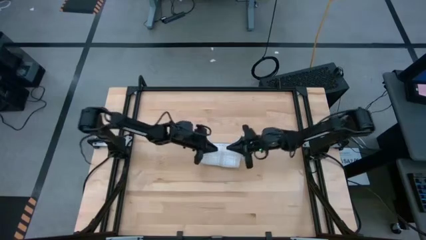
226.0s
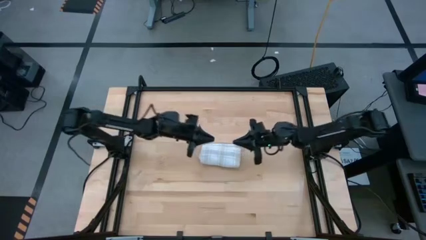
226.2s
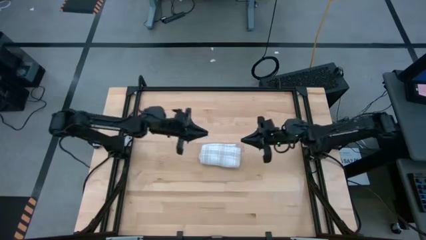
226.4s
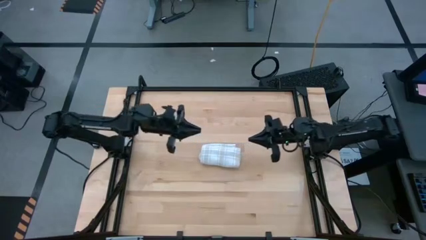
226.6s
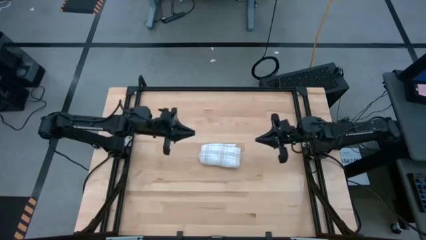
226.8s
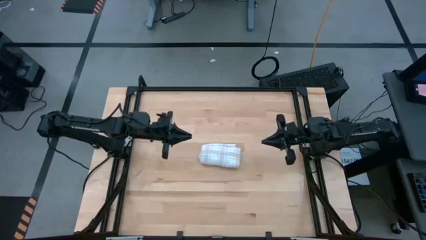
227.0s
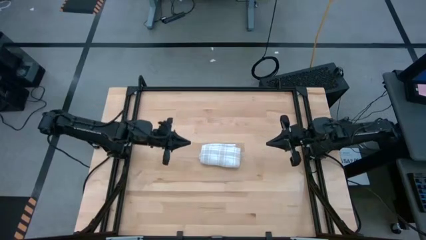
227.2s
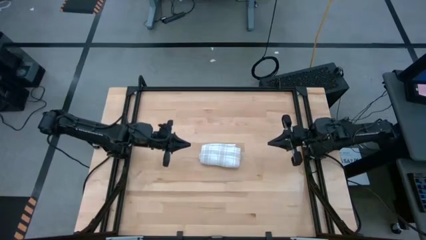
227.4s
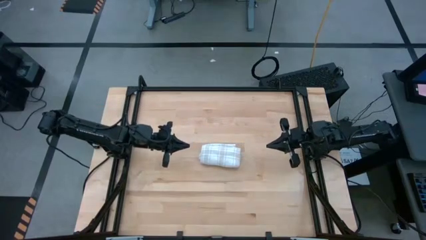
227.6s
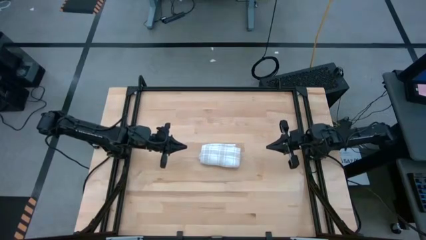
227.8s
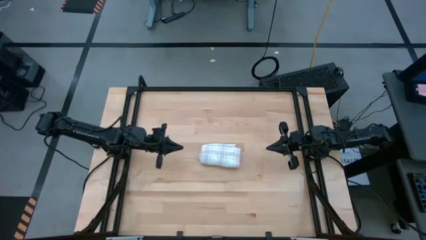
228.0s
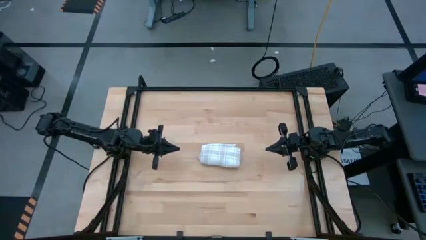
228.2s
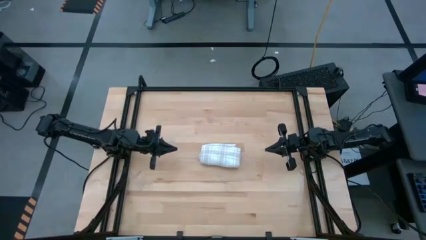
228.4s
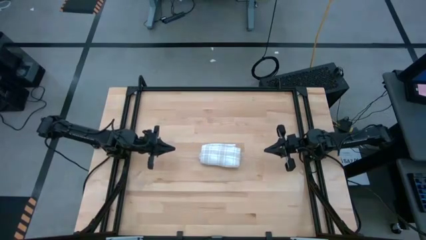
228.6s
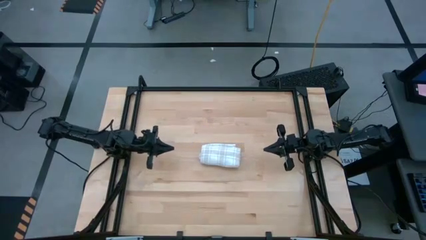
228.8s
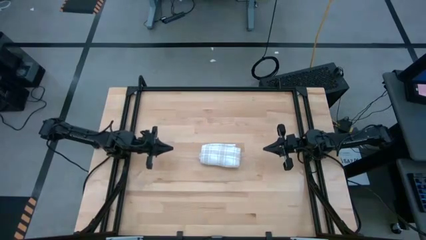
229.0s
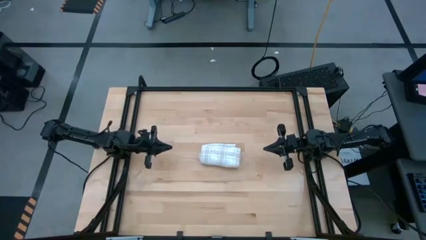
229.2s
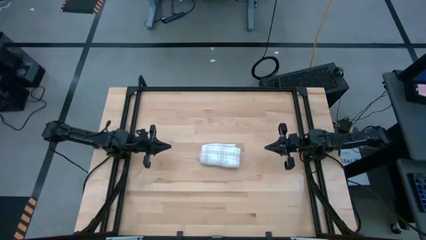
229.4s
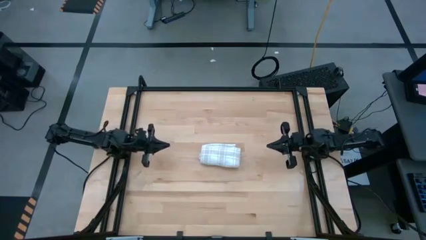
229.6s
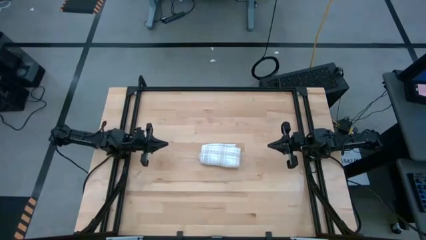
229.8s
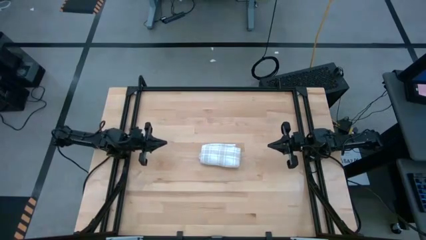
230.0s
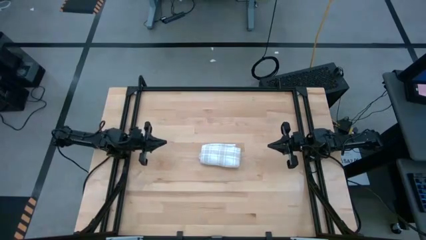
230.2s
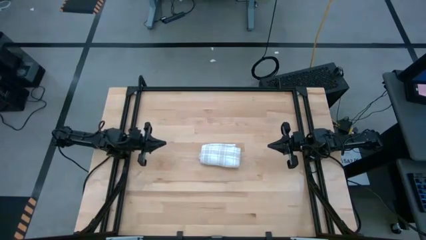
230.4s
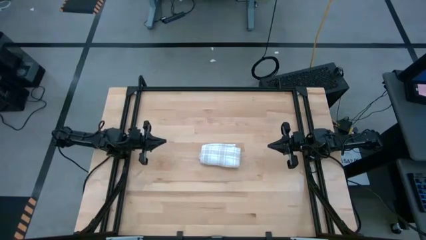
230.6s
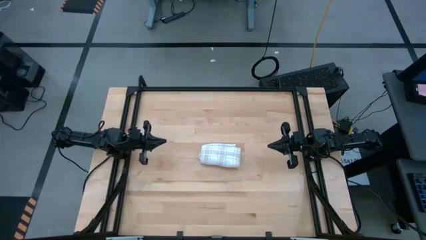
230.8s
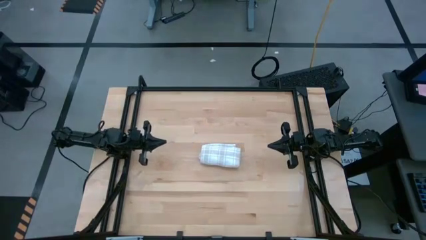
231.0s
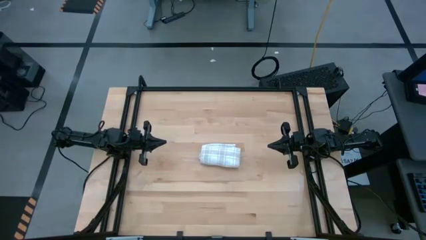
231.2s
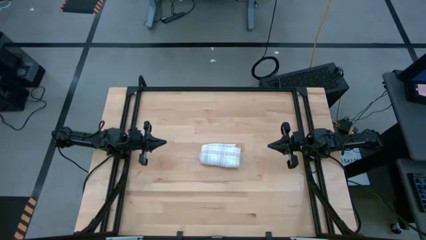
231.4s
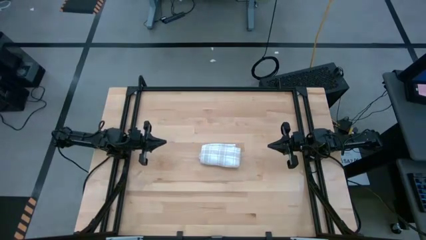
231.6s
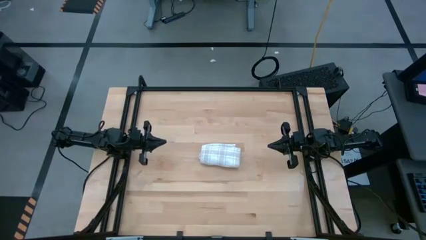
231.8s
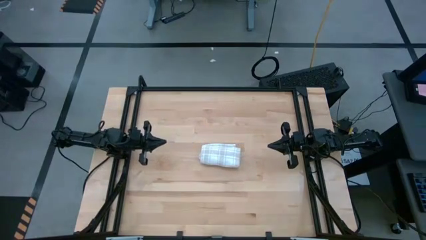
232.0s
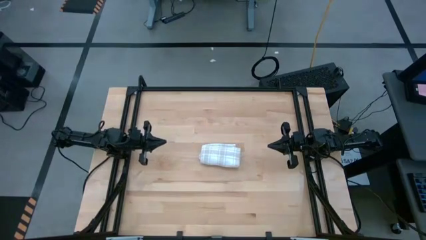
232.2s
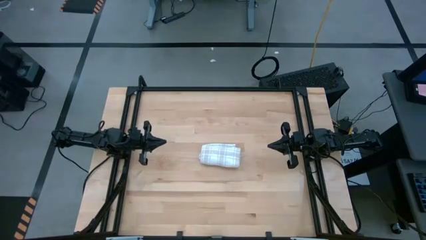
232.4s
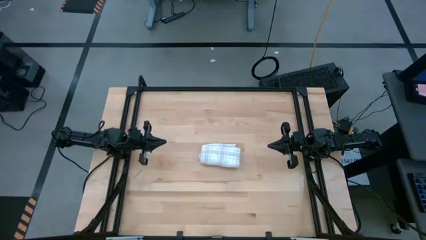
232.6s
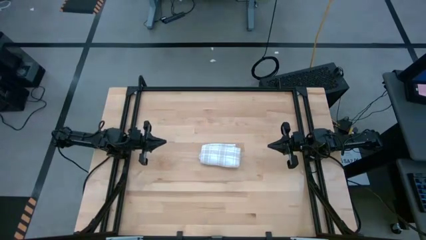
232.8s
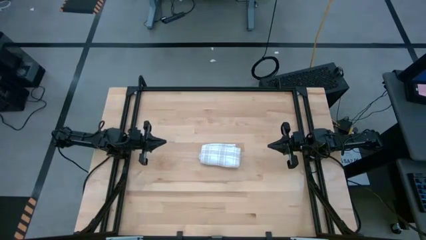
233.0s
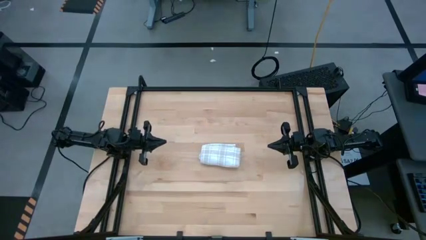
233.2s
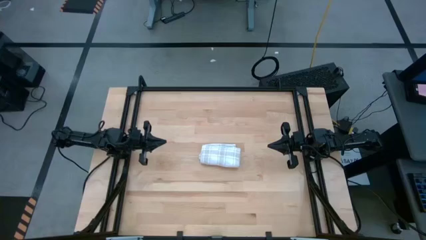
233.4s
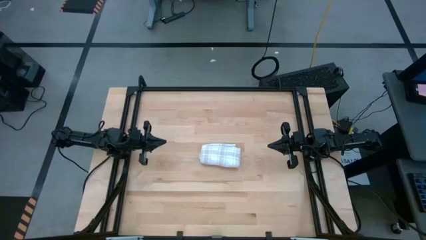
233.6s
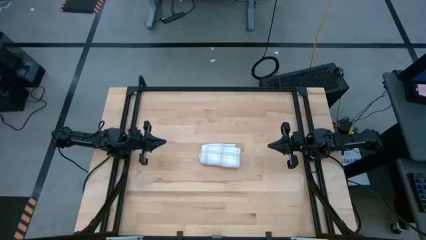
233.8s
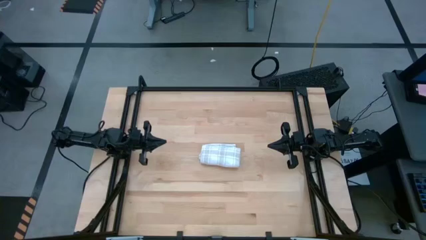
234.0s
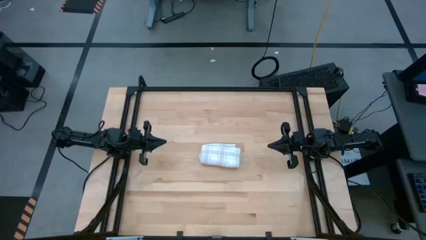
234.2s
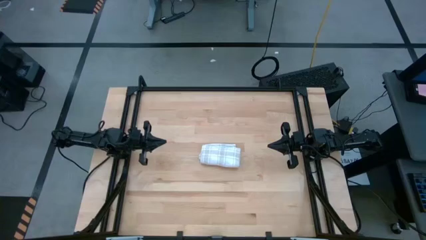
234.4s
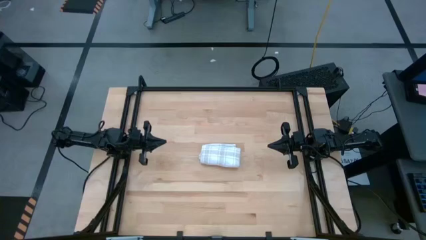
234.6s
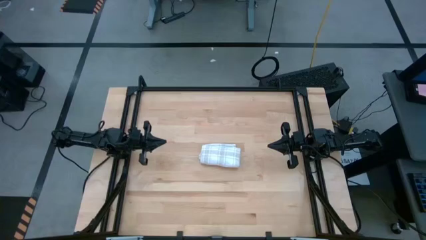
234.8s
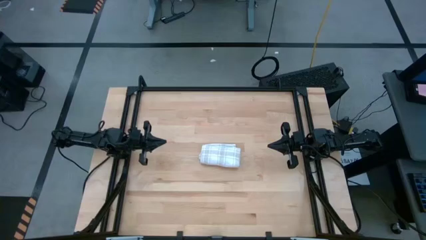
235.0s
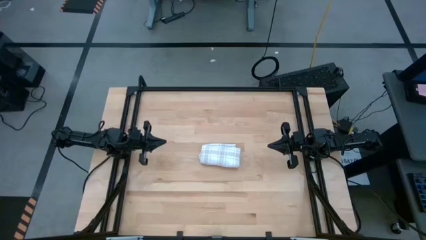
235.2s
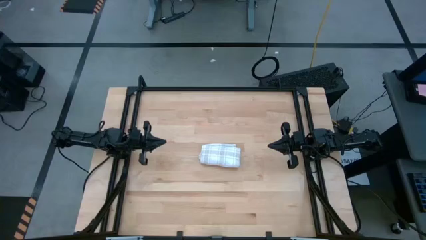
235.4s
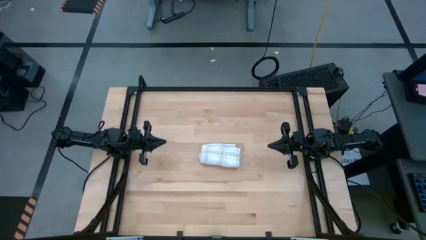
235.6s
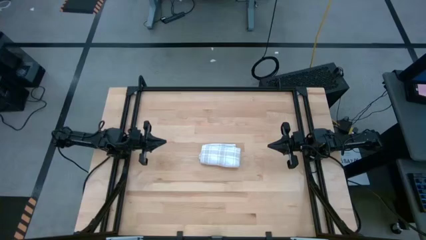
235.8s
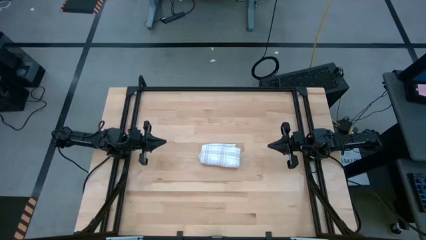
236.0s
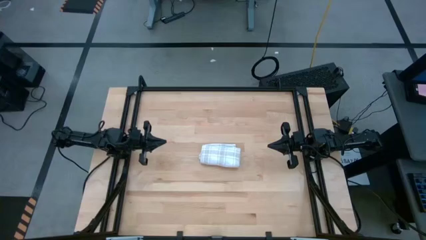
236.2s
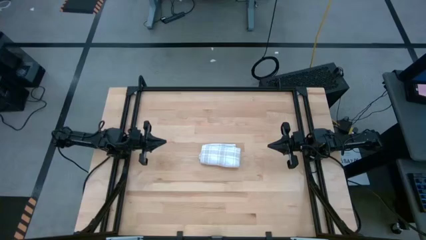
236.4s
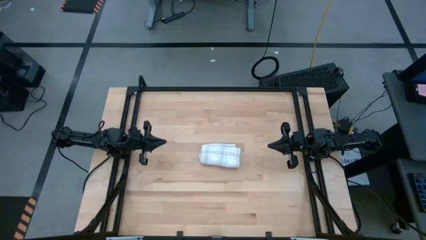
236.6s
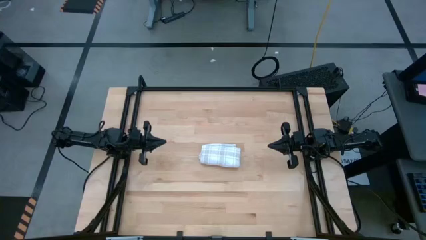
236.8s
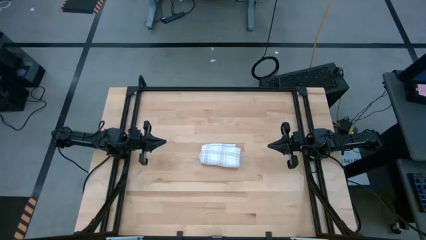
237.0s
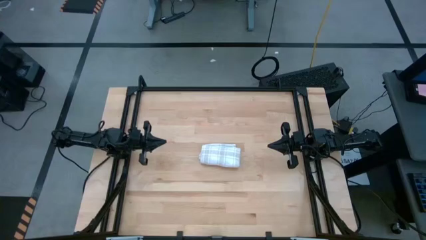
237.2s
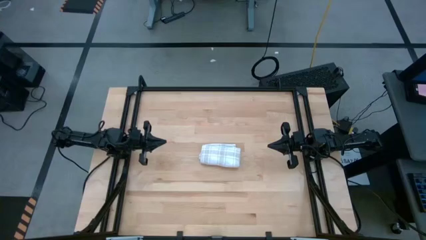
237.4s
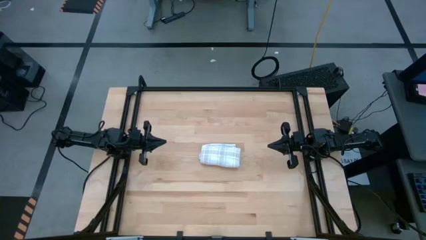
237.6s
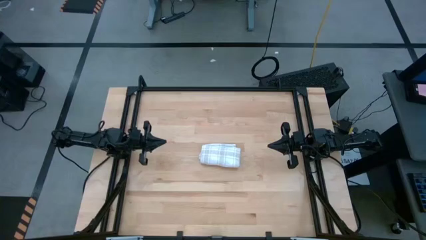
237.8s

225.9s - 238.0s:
Task: Roll towel
Return to Home Position

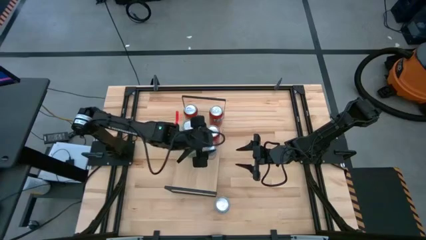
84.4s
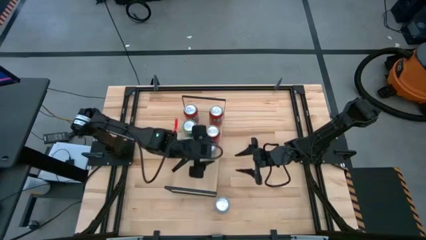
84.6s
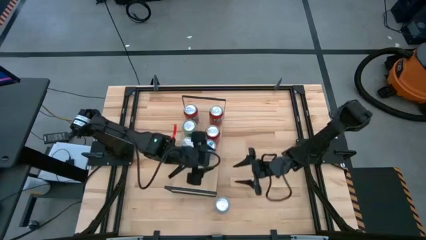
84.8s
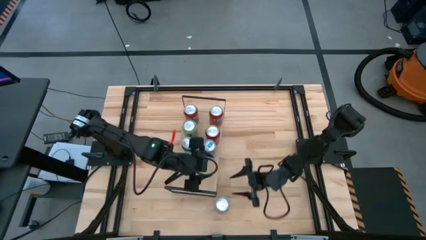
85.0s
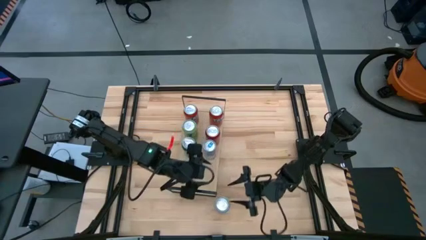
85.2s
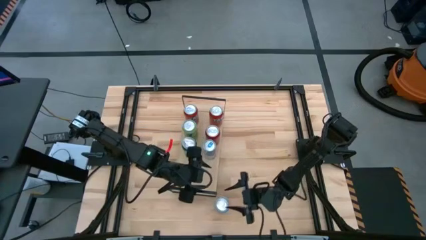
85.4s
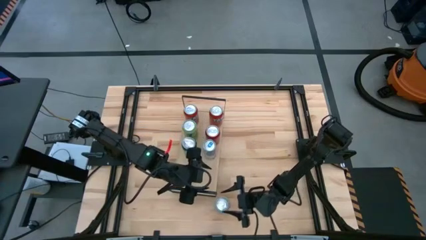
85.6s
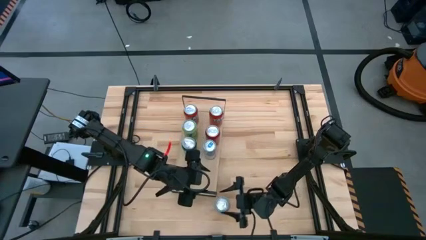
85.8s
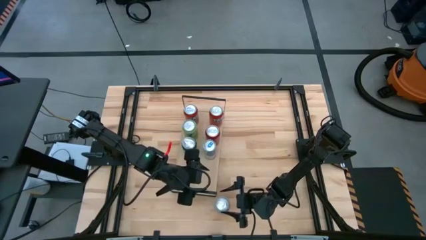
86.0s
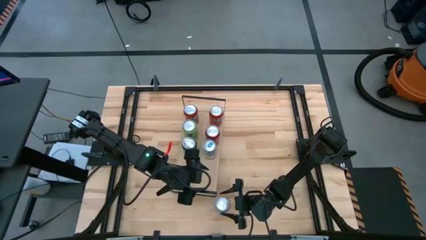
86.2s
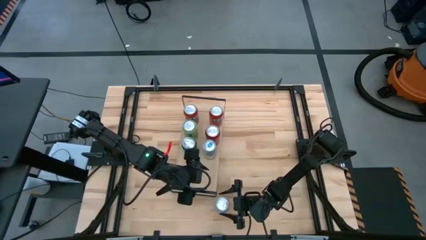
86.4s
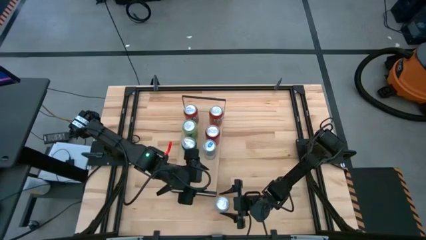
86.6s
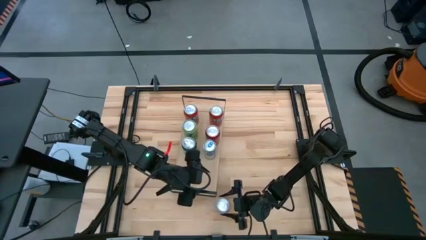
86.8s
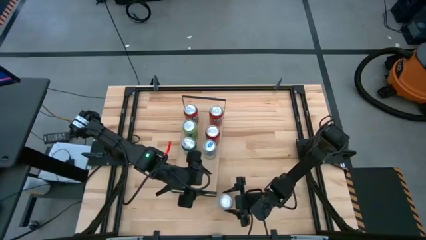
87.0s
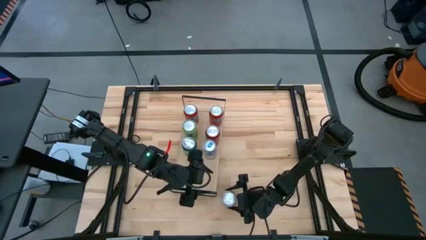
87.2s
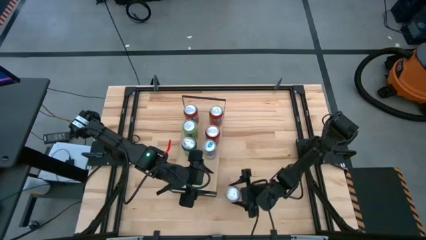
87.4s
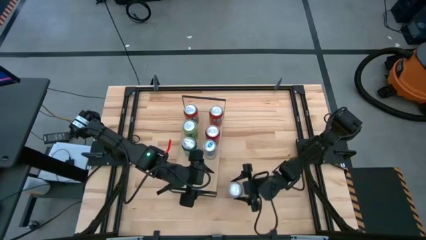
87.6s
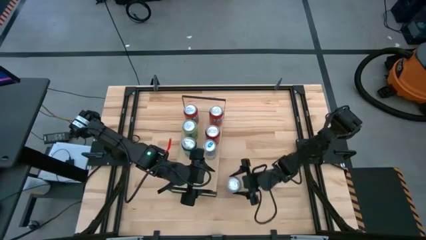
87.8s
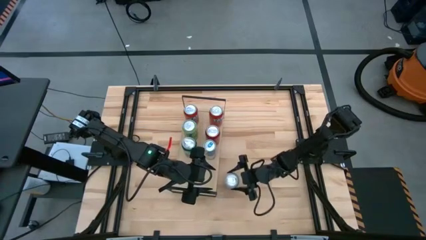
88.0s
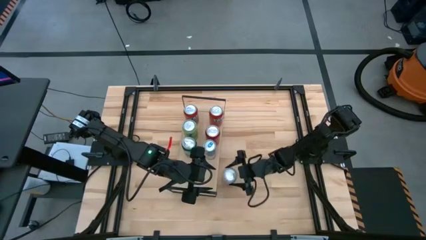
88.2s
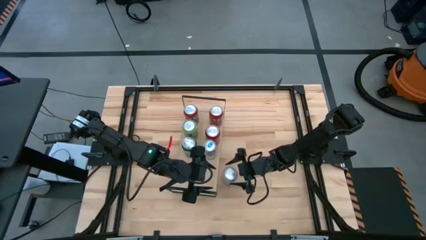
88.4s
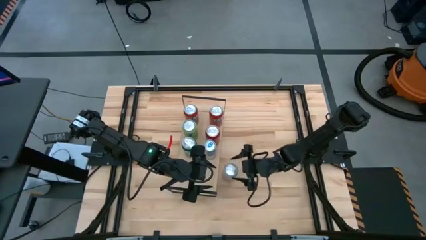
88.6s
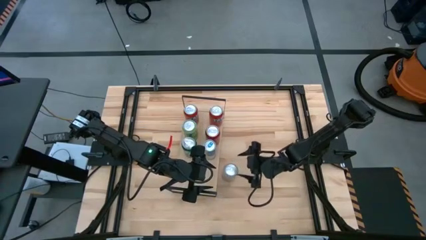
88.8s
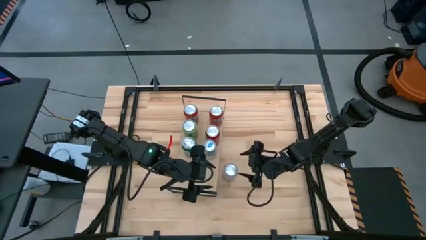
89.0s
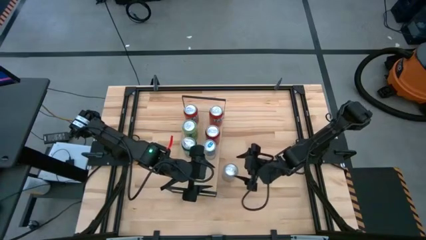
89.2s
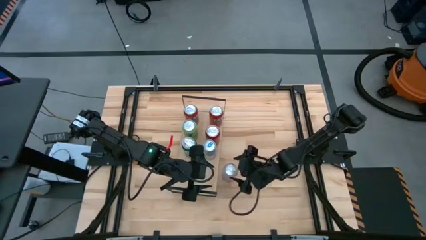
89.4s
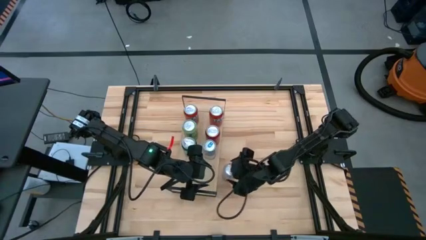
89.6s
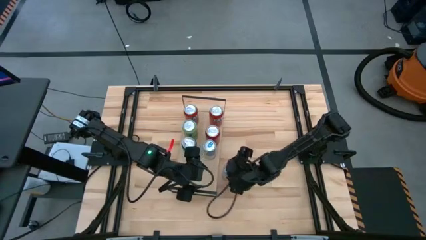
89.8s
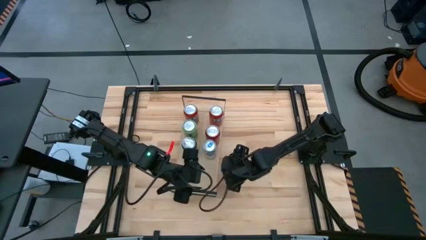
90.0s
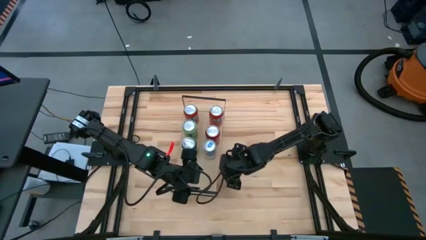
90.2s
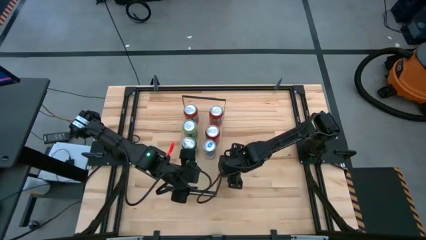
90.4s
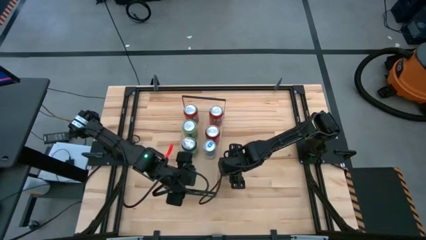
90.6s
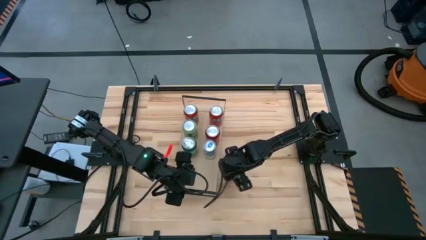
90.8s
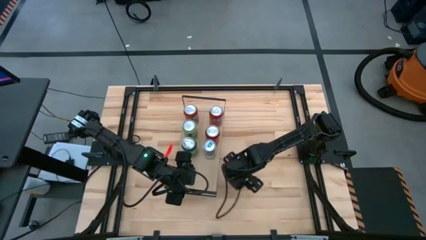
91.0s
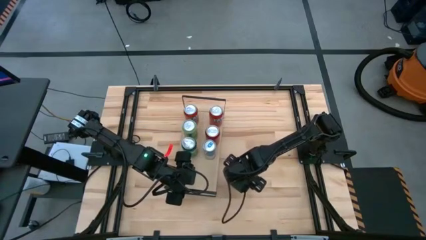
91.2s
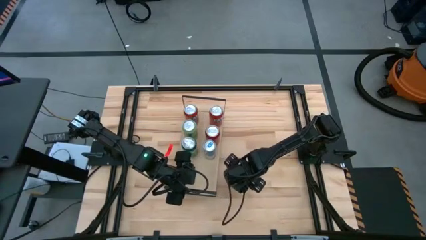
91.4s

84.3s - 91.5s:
Task: Place canned beverage on shelf
Put the orange white soda can on the shelf
